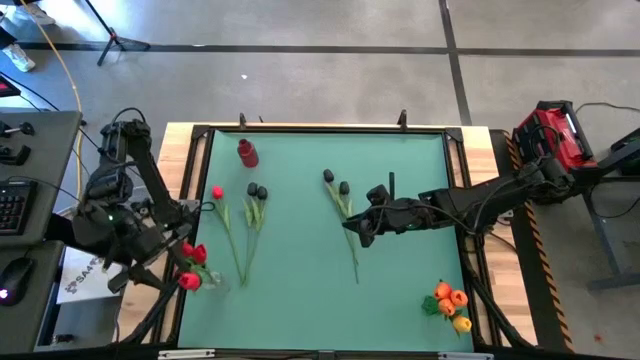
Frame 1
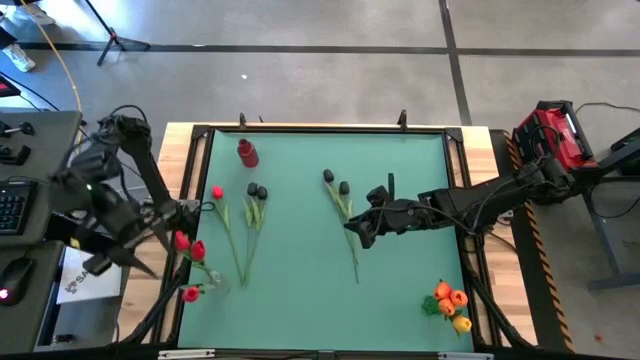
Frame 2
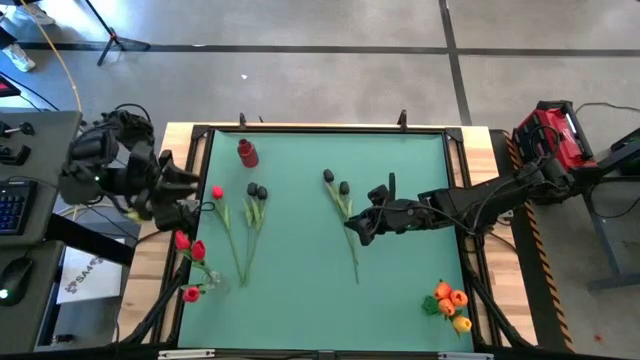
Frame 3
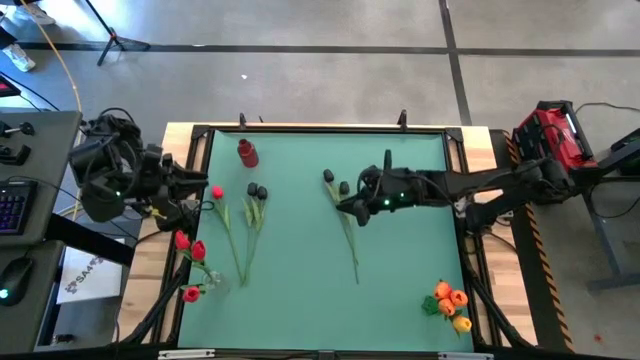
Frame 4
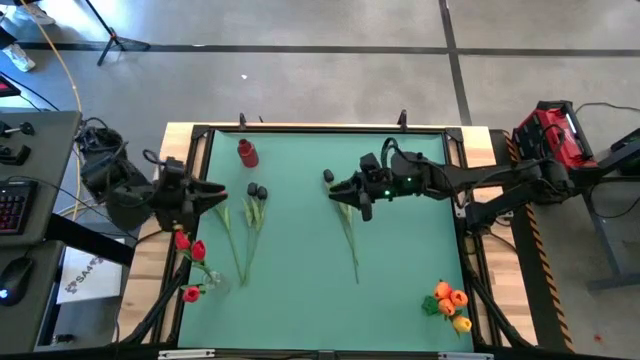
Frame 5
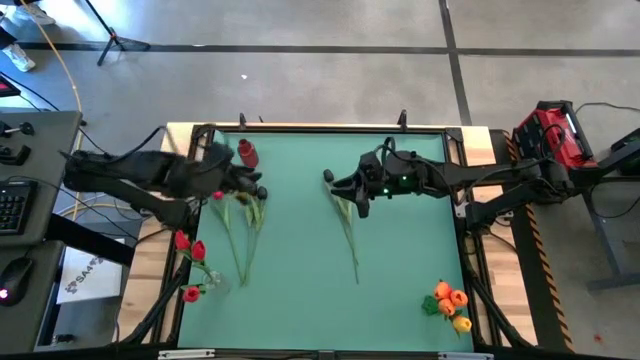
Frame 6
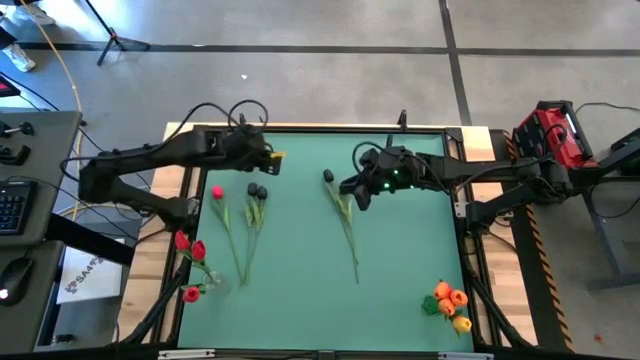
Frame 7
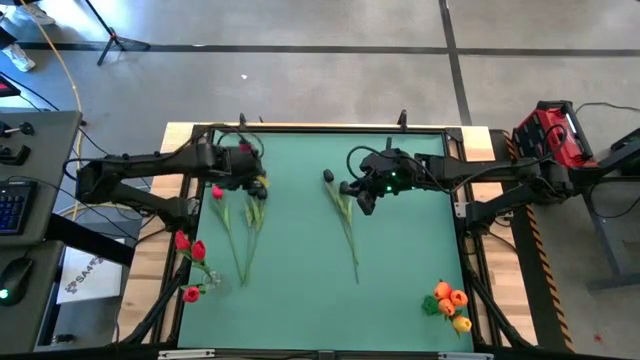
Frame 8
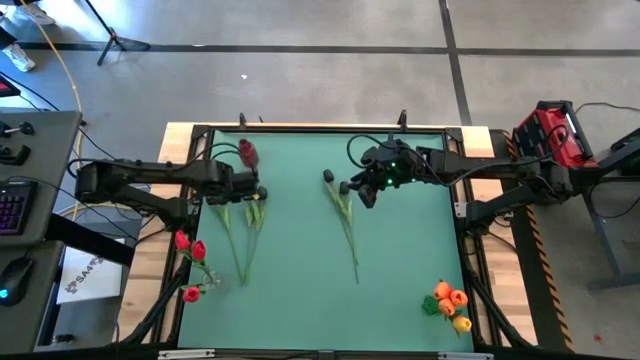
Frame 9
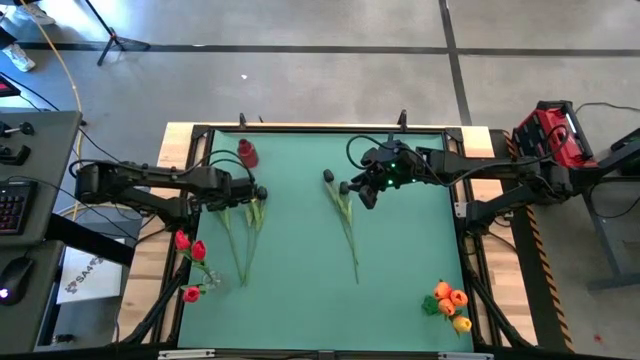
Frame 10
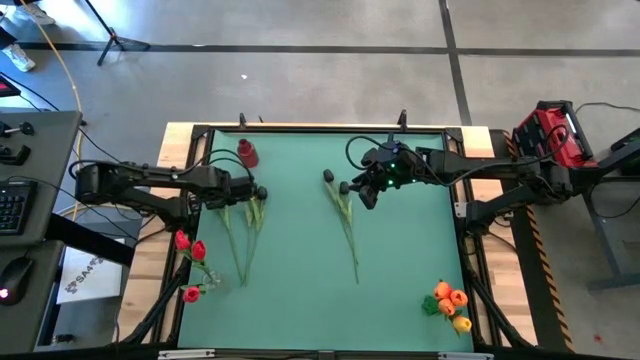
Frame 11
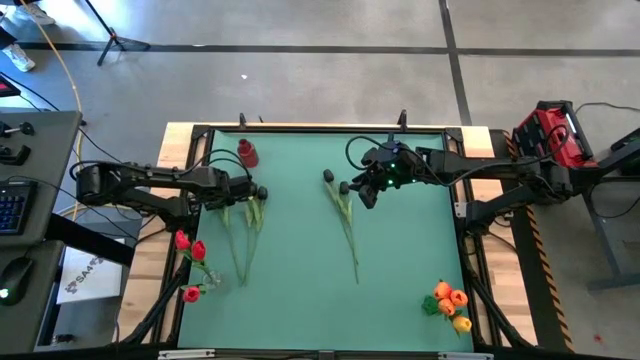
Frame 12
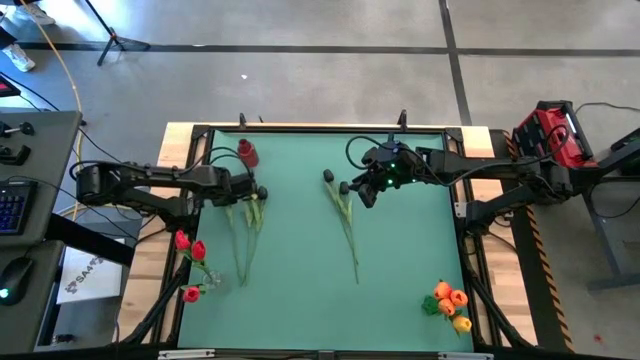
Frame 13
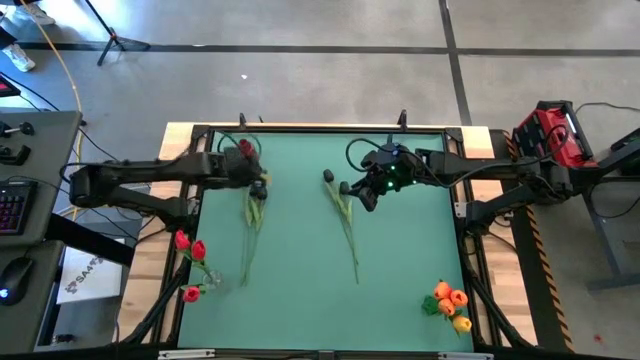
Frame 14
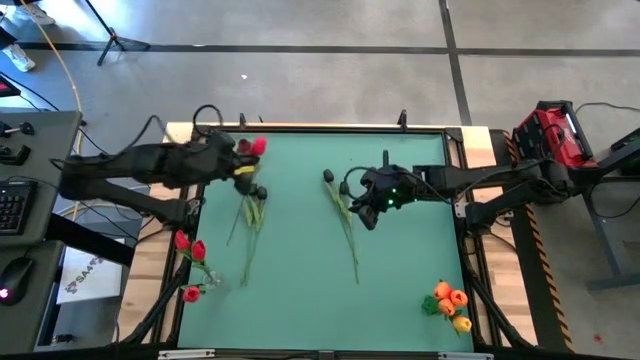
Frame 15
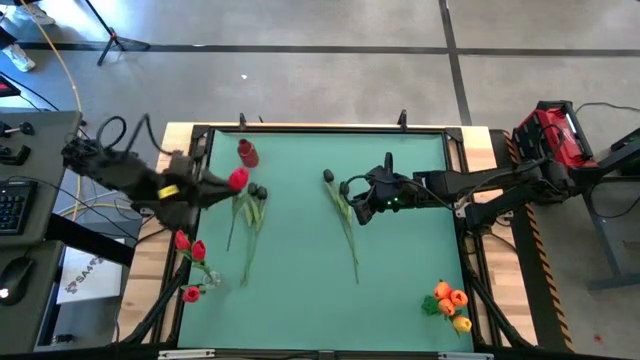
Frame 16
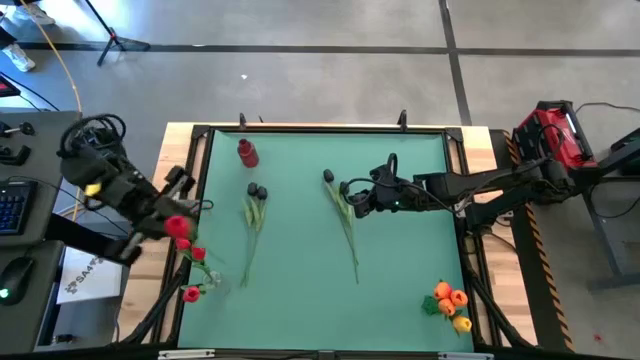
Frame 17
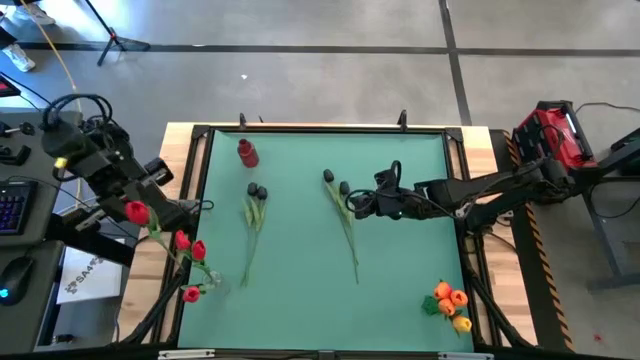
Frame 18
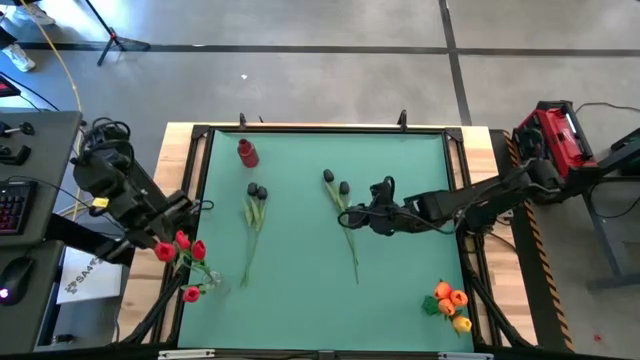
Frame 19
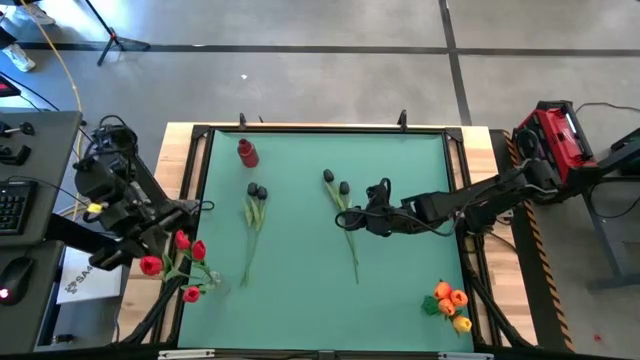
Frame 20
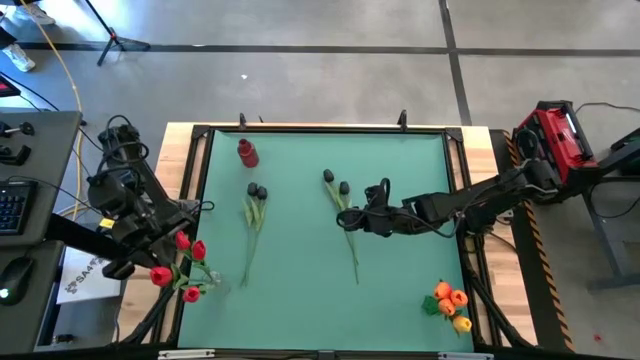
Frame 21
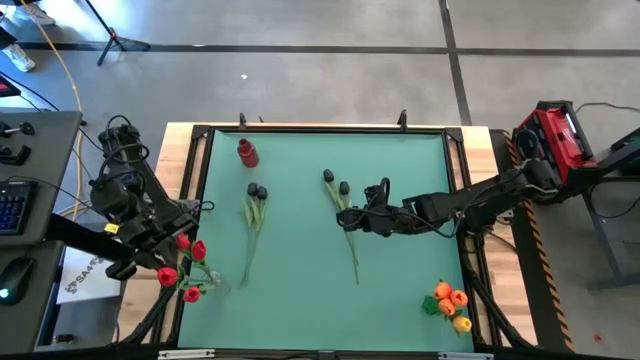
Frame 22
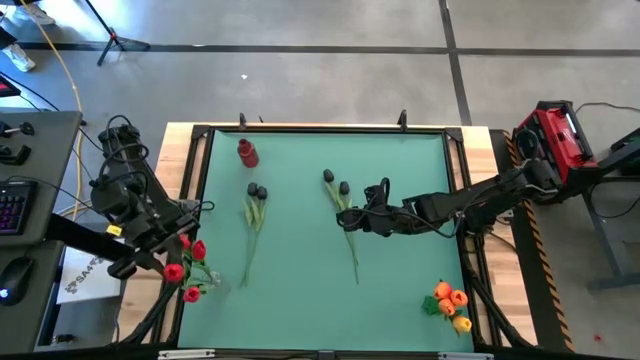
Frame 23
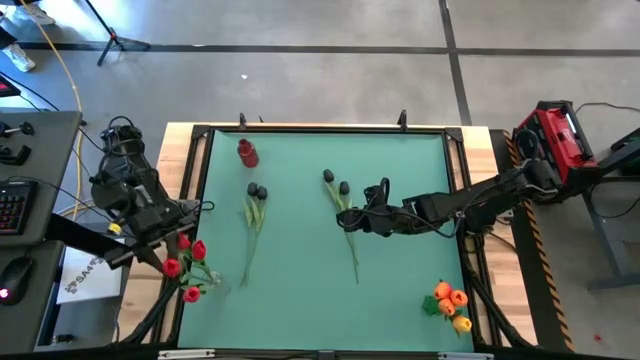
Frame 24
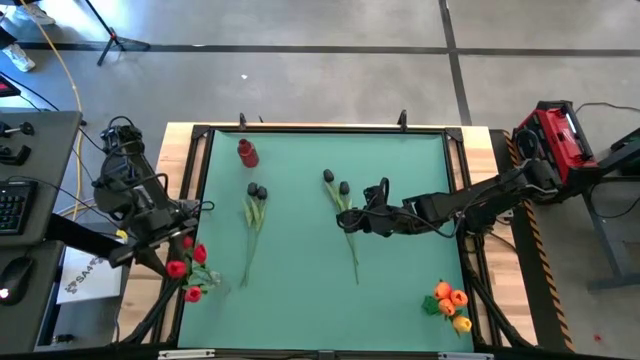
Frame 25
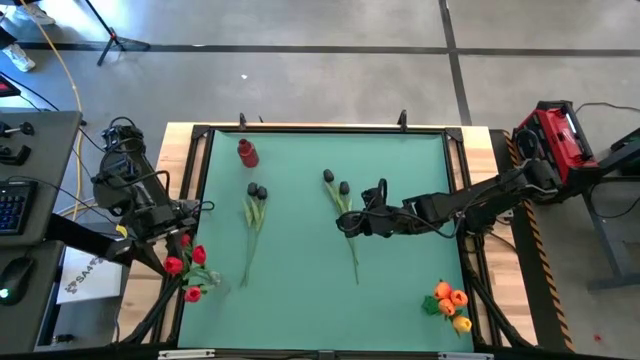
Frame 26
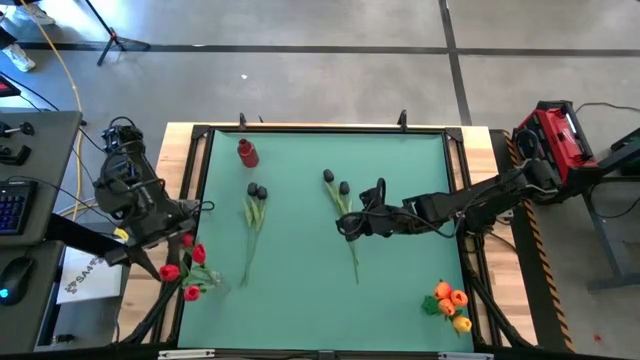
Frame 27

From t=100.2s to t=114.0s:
Task: Sort flowers into vase by color
Put the red flower into the transparent vase

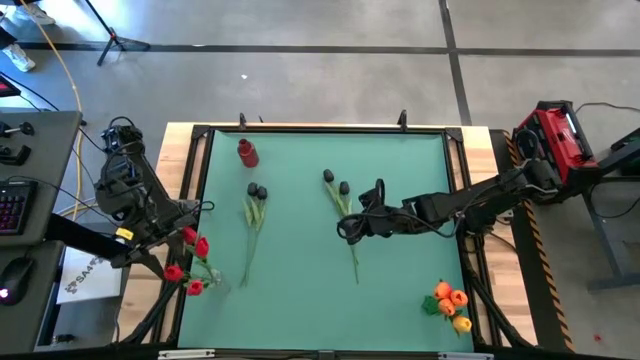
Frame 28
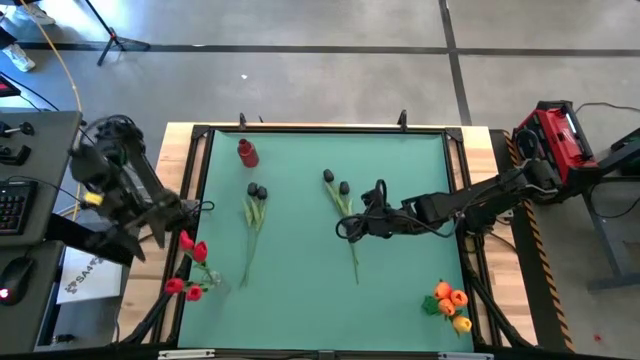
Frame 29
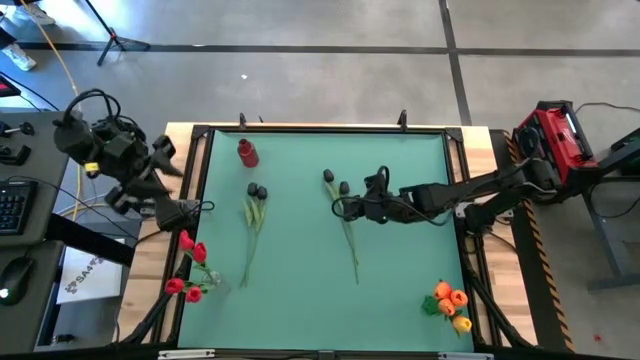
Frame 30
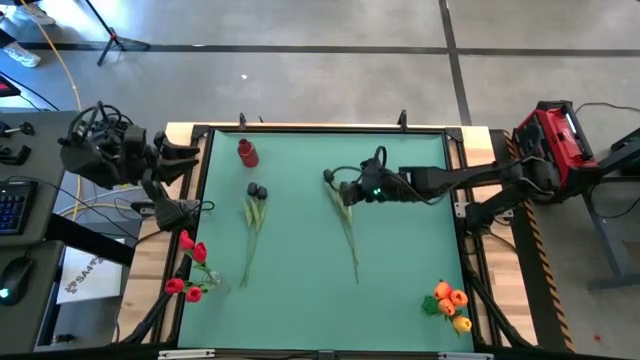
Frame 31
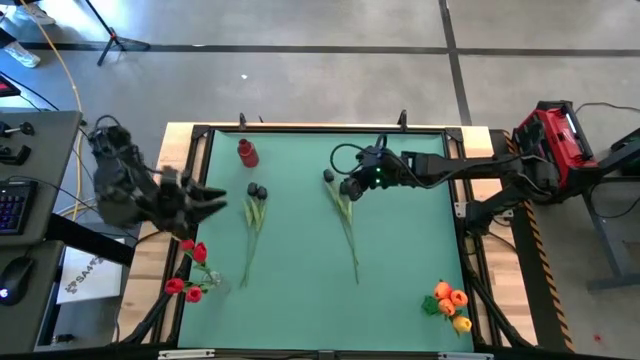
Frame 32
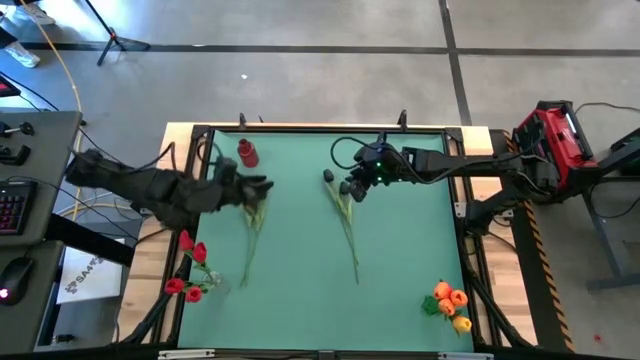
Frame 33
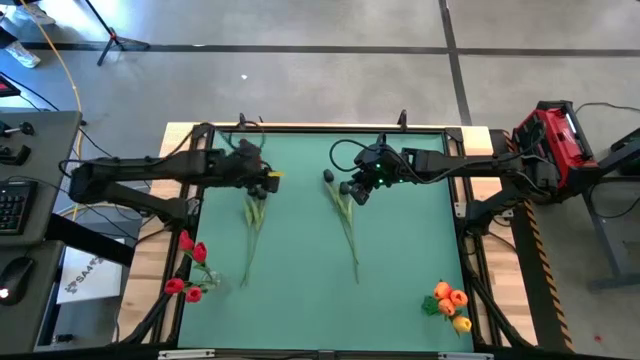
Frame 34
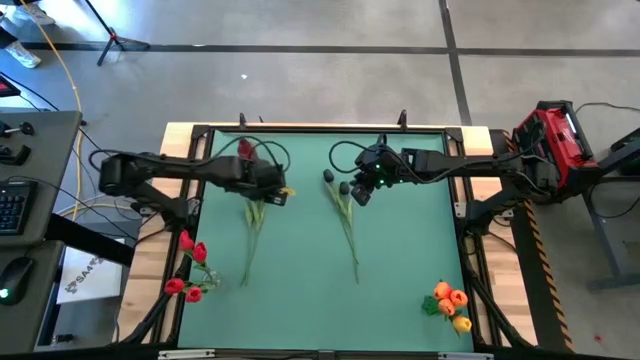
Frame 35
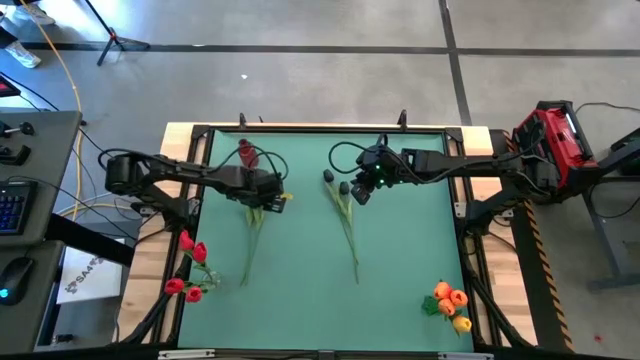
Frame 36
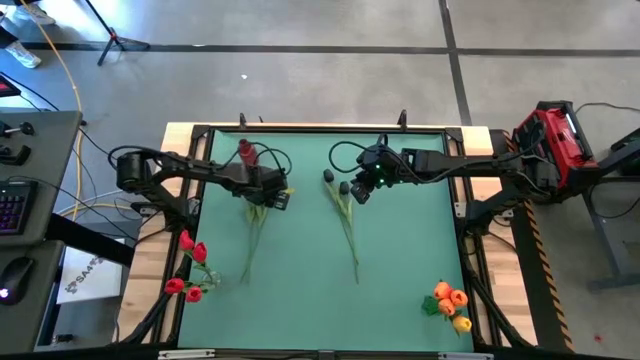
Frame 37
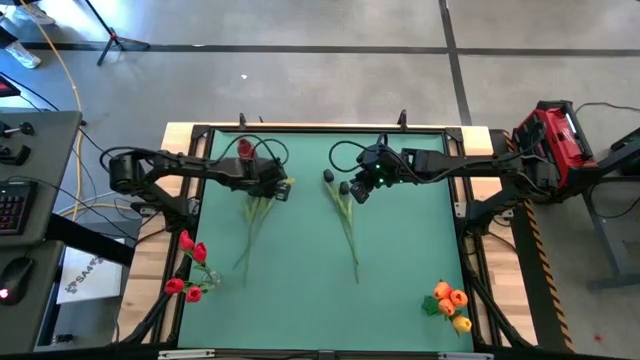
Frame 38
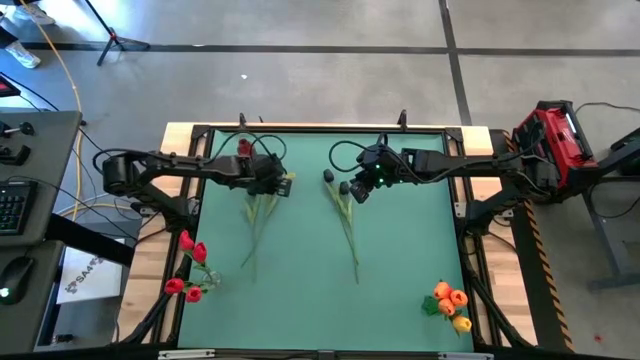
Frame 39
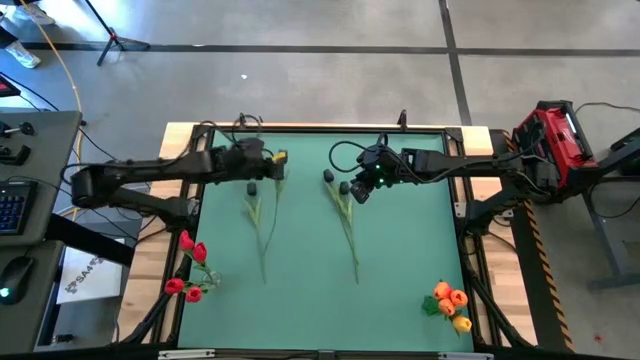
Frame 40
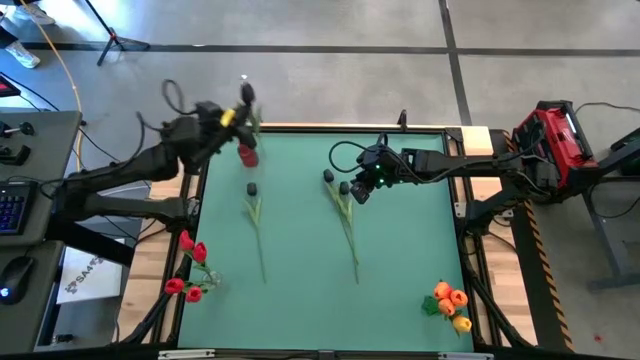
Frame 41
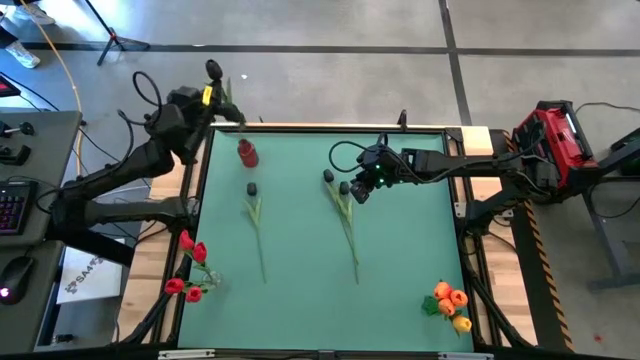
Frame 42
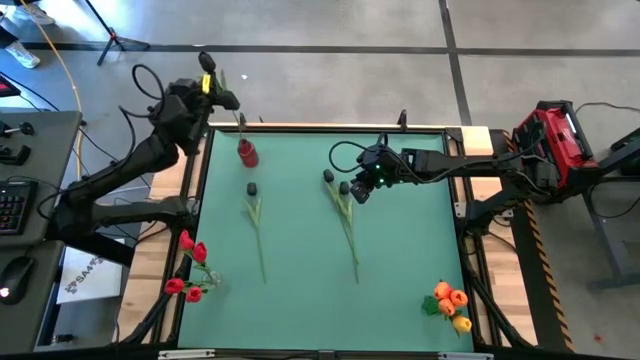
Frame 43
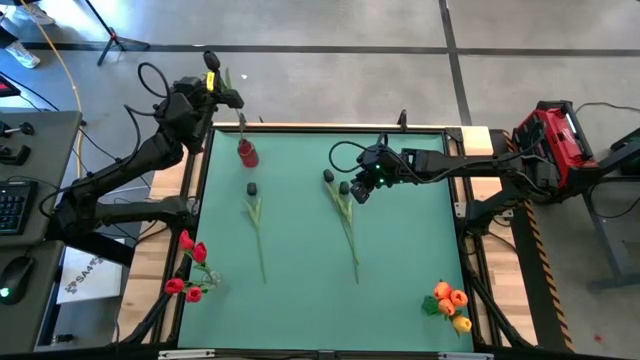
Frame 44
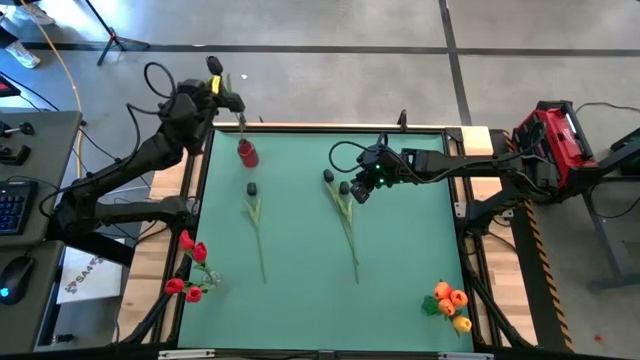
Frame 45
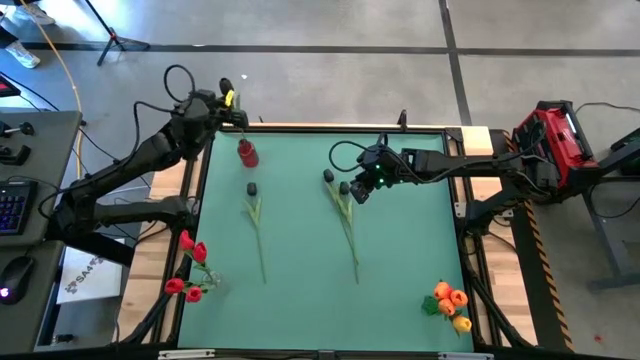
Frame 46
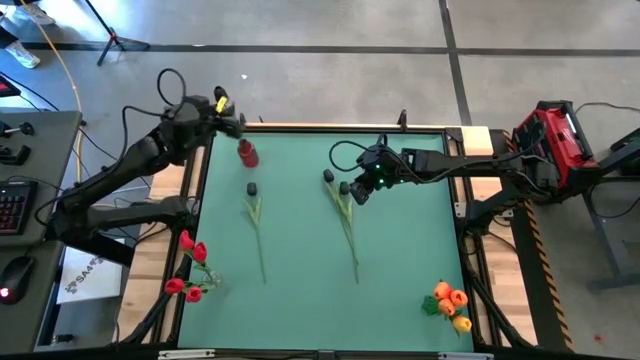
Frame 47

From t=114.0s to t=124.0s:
Put the black flower into the red vase
